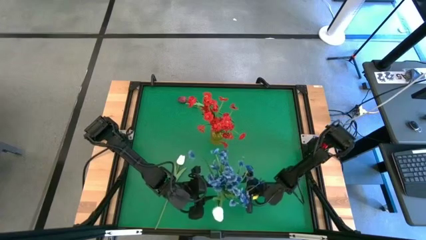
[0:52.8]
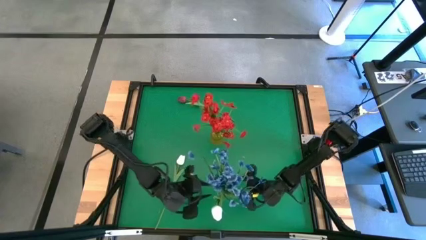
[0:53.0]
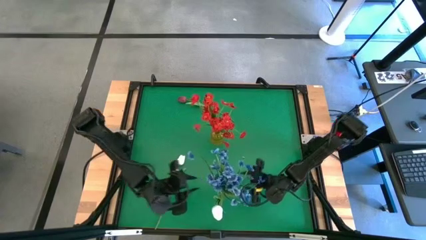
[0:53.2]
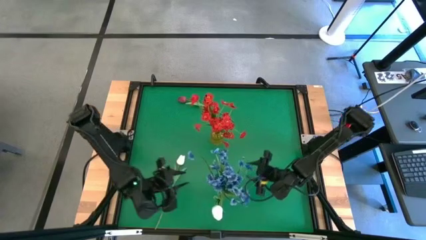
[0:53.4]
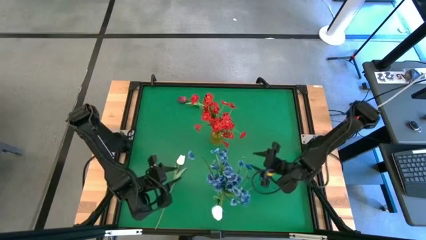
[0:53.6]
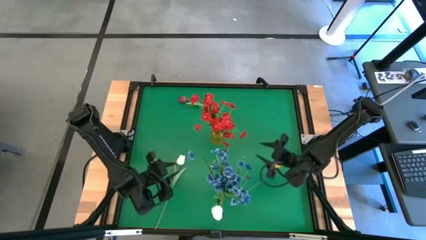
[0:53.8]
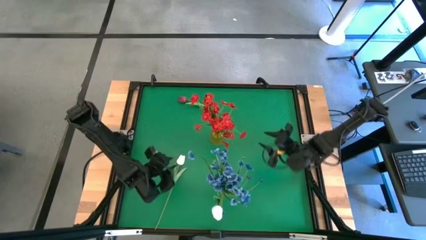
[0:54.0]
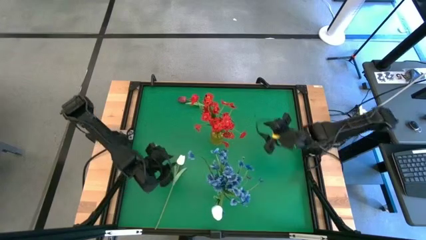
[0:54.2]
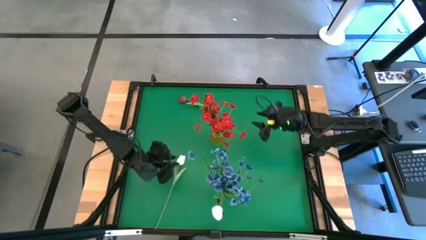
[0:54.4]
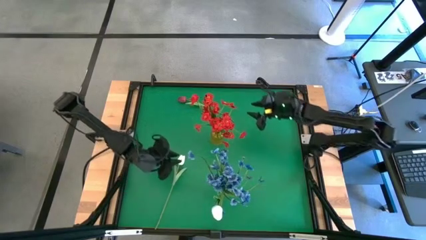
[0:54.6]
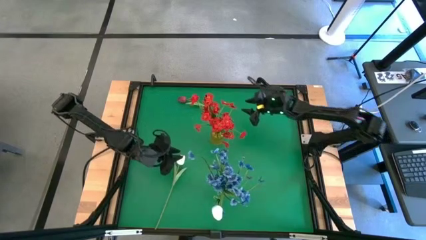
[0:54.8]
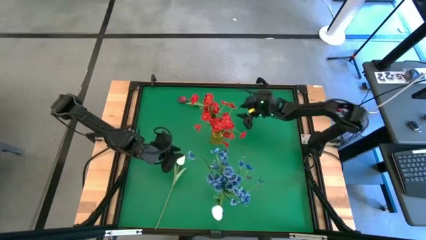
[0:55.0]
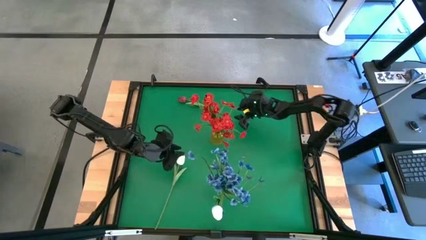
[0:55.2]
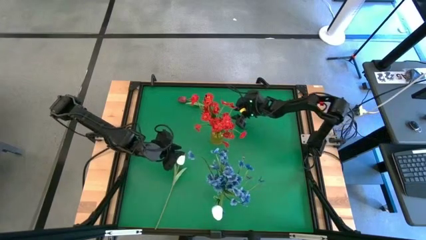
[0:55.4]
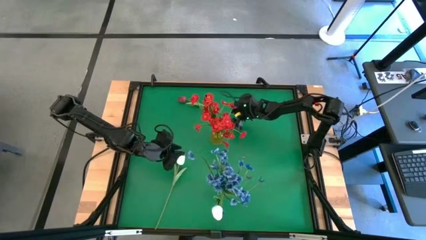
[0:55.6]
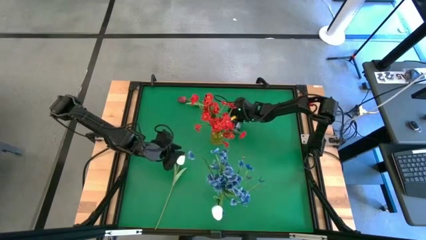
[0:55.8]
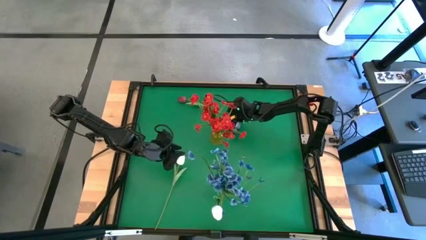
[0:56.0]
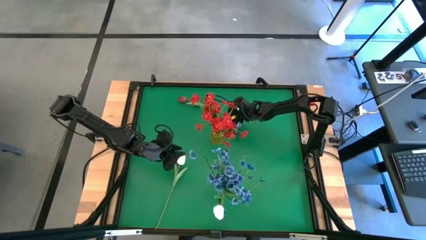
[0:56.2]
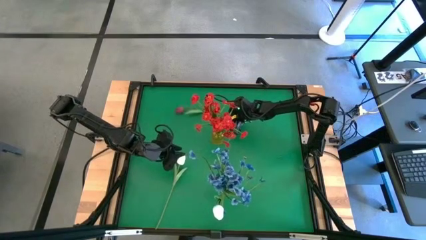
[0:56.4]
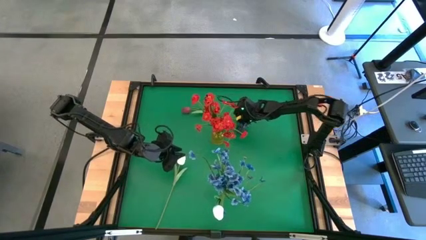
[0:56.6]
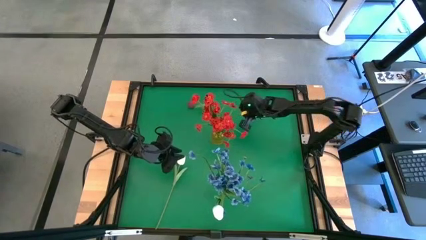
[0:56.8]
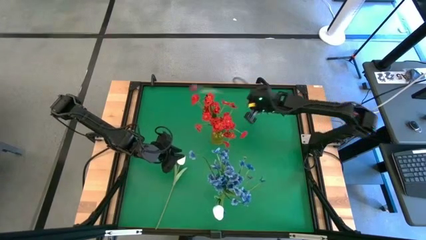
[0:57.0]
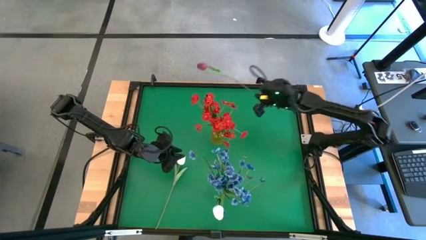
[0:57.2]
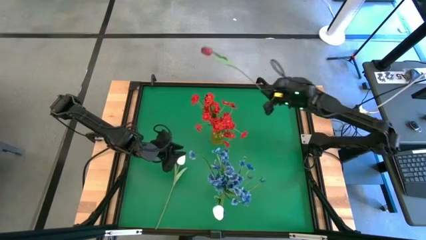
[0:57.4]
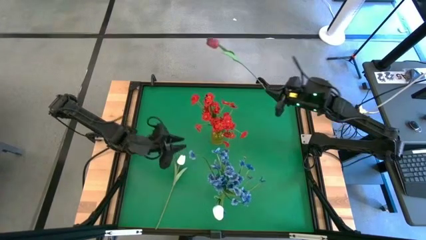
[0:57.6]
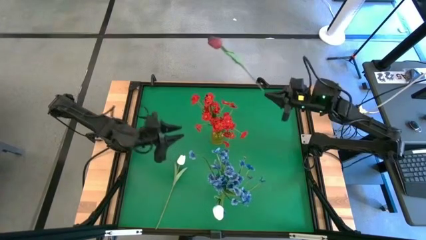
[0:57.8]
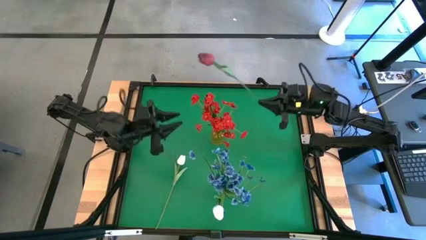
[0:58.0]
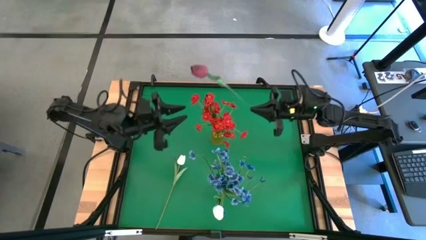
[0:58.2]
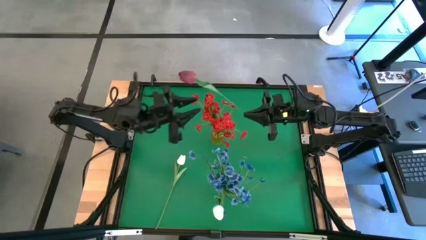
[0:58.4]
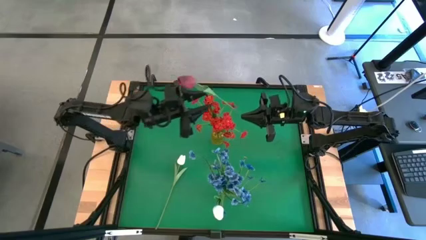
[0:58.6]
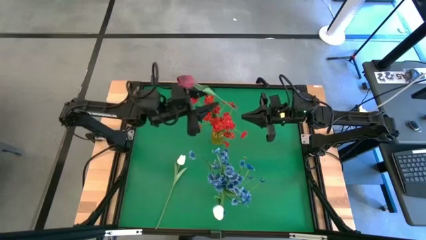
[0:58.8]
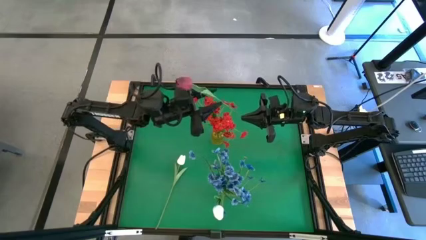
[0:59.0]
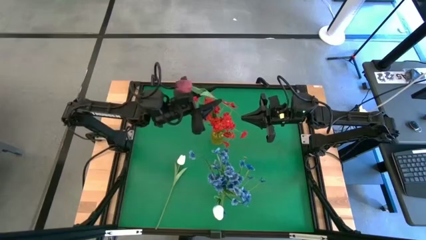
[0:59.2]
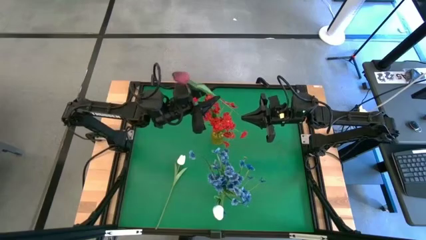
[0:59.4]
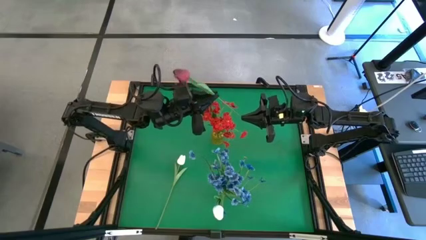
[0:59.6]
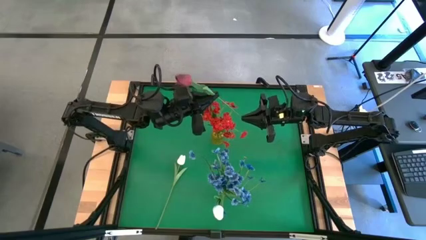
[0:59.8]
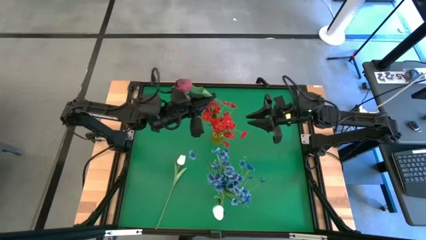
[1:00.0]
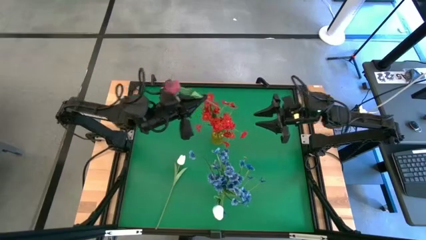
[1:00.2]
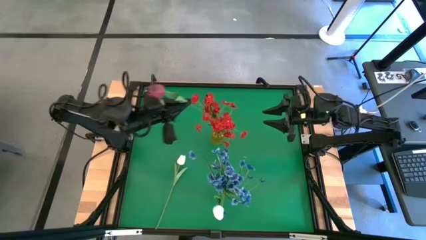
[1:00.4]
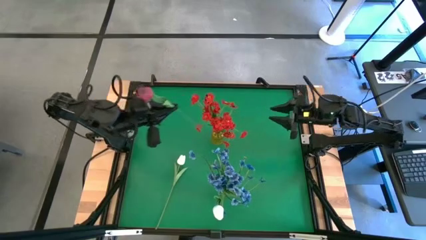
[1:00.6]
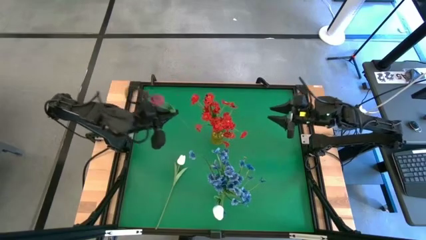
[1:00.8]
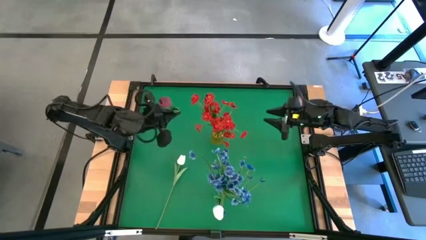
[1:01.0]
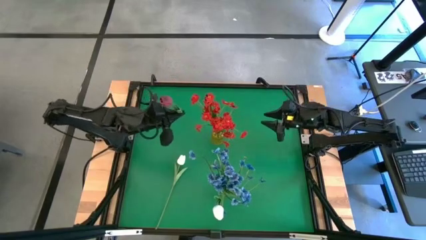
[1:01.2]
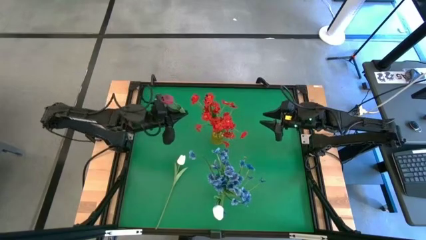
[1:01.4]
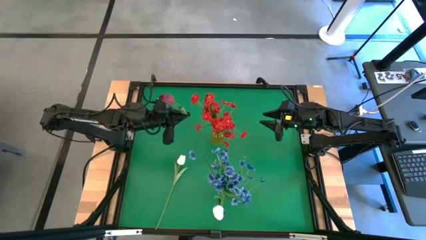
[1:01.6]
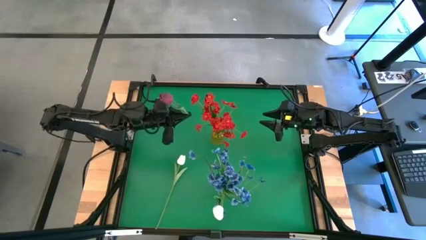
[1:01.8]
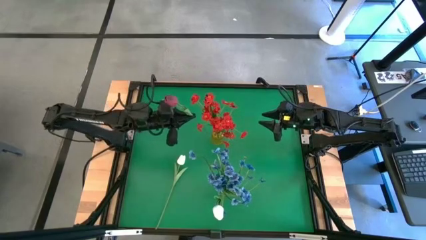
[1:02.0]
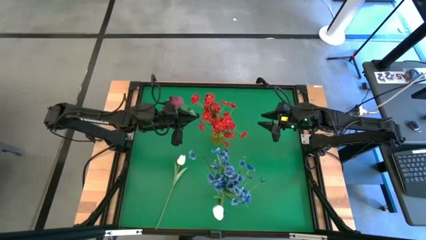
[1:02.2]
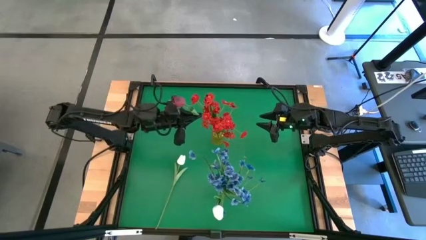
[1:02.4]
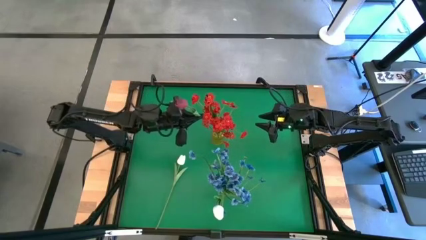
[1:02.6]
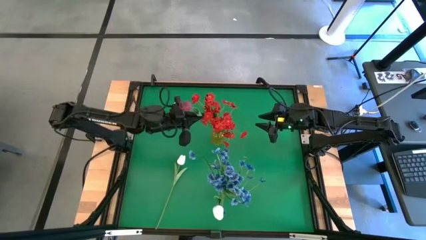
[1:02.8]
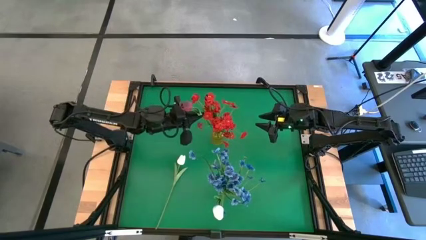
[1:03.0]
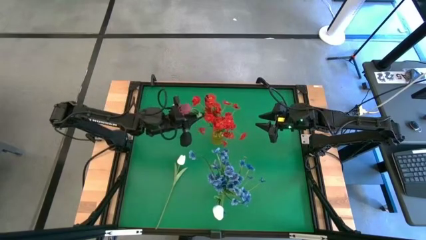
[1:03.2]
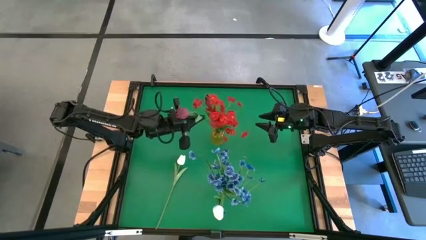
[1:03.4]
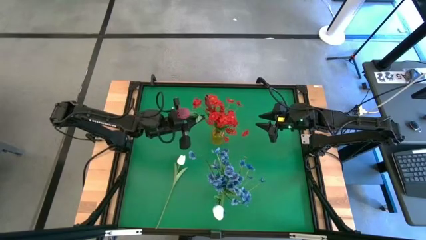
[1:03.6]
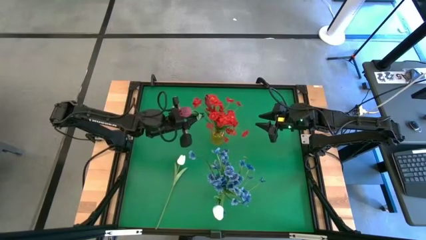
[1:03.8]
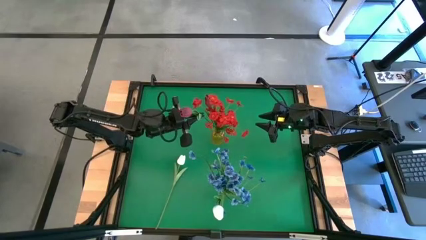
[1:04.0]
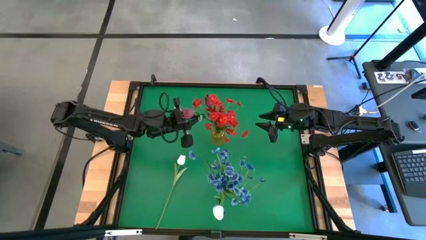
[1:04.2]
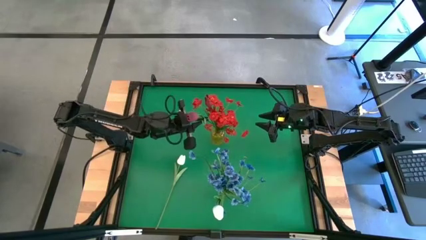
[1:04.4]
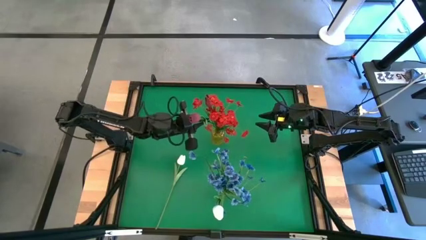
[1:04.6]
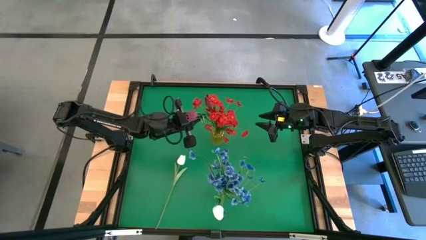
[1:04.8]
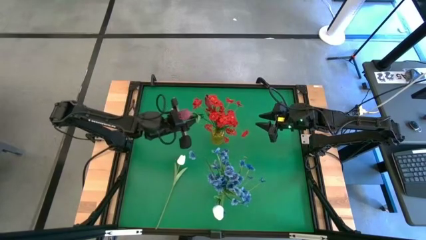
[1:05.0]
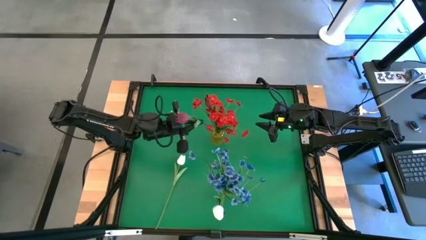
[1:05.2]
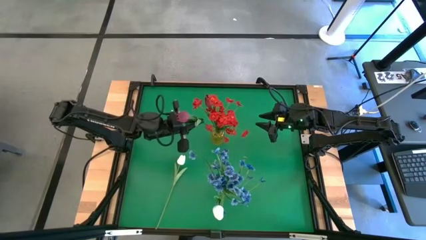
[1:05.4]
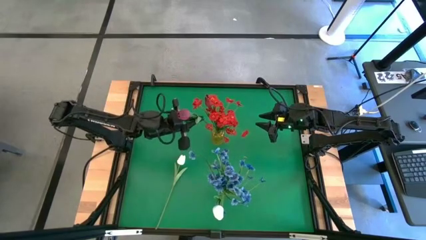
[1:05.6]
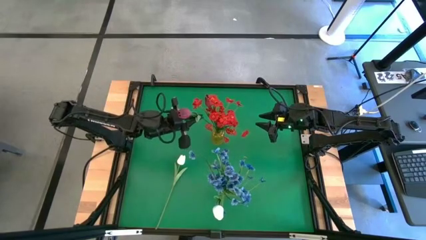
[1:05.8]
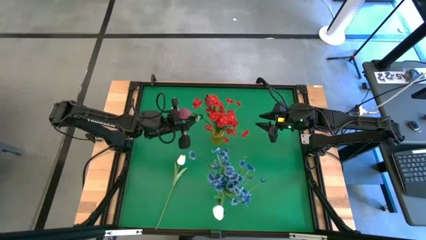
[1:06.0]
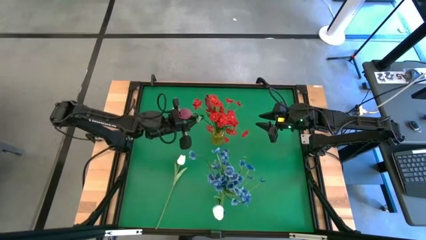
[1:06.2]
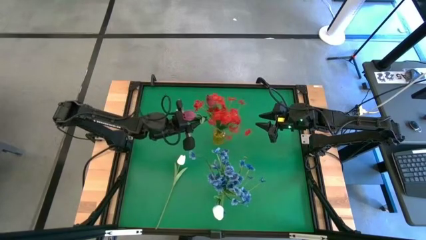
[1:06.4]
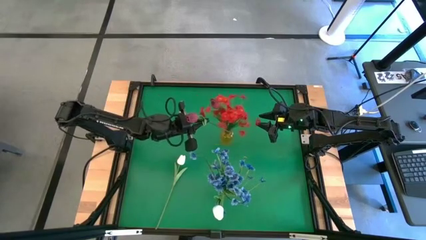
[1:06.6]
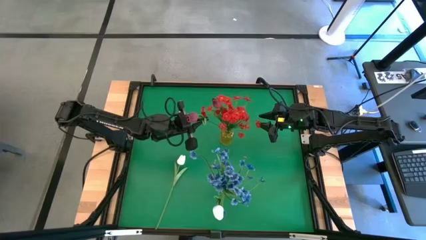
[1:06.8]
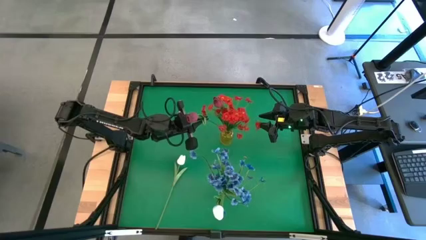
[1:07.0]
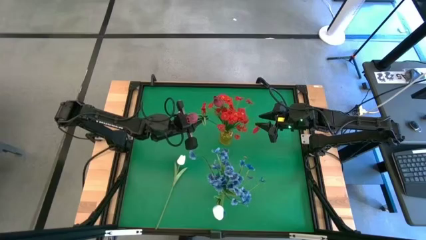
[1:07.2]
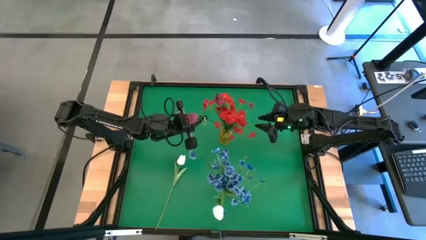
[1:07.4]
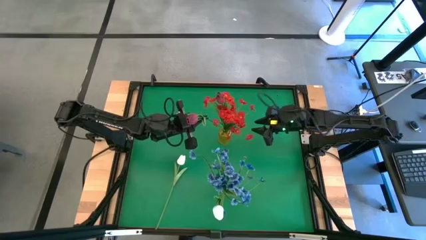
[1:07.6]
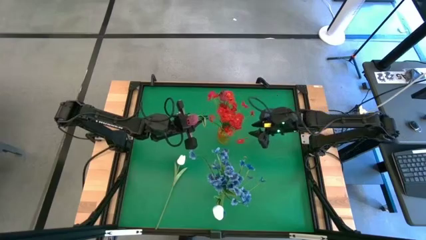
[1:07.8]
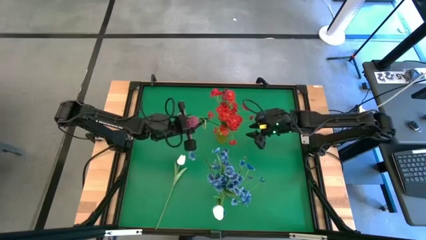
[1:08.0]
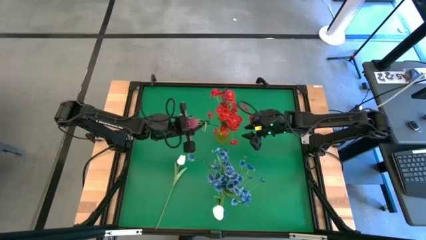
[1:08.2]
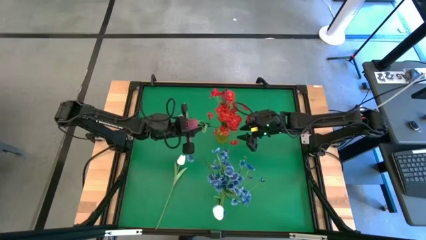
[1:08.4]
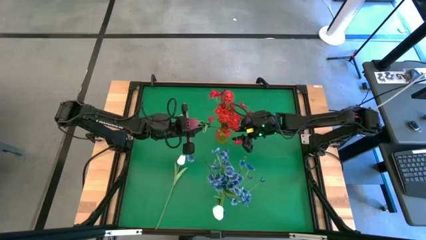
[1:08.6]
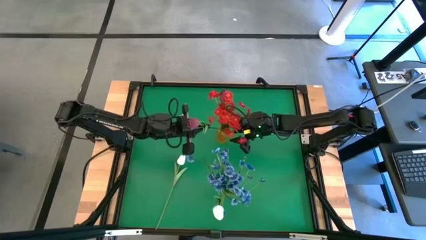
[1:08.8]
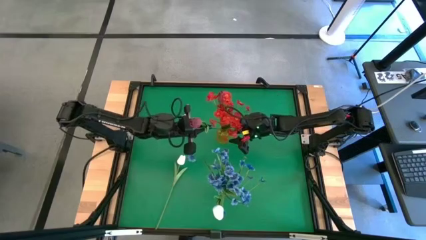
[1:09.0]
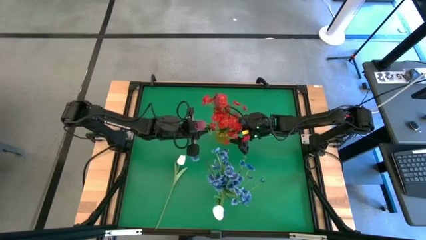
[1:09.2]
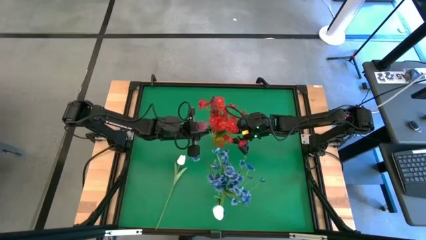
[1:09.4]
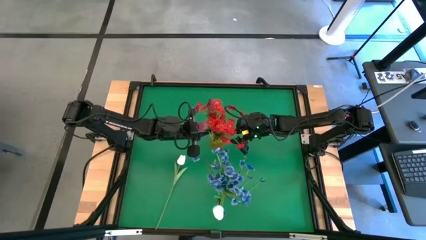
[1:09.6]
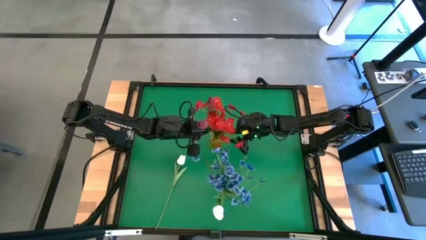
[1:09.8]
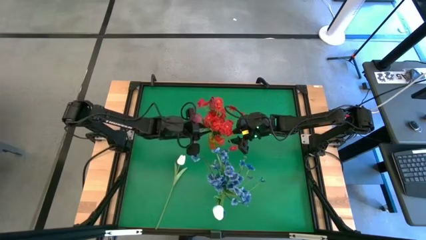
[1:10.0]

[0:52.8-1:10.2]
Task: Sort flowers into vase by color
Put the dark red flower into the yellow vase
